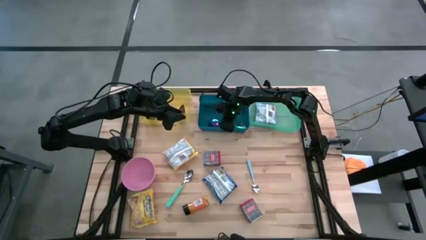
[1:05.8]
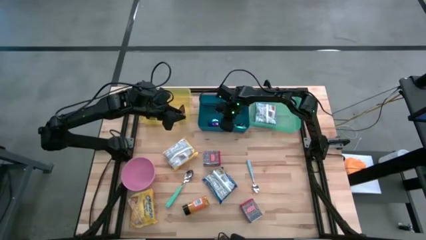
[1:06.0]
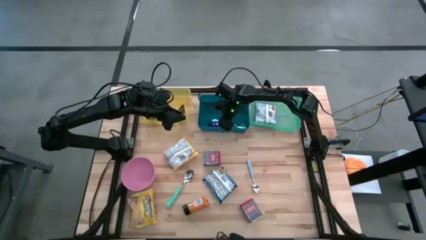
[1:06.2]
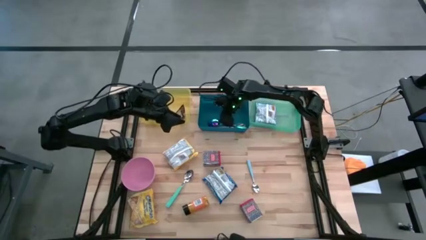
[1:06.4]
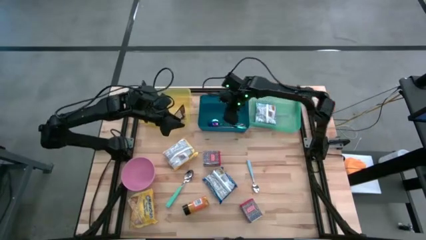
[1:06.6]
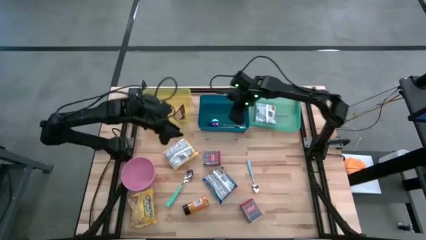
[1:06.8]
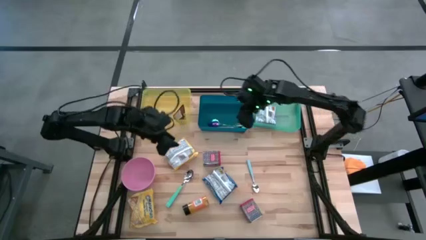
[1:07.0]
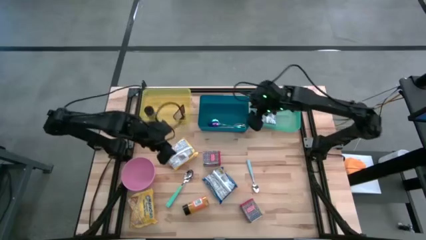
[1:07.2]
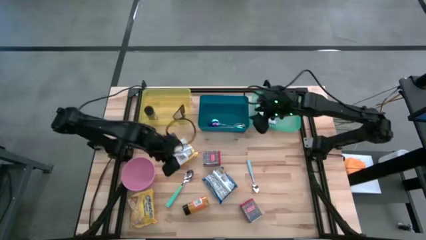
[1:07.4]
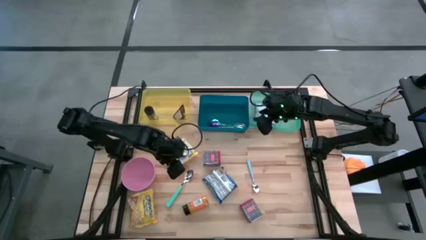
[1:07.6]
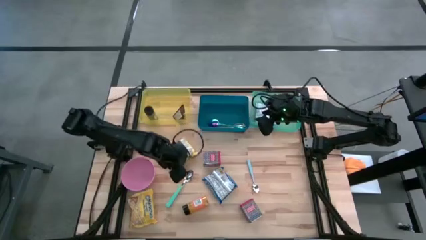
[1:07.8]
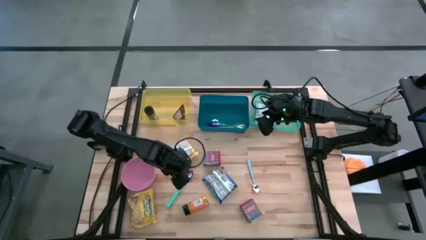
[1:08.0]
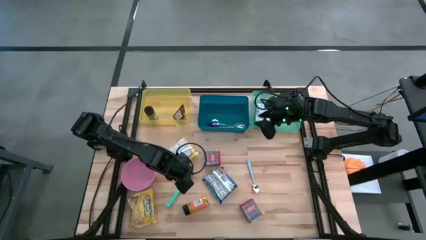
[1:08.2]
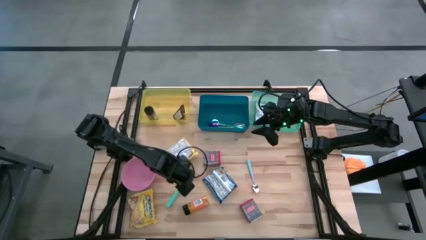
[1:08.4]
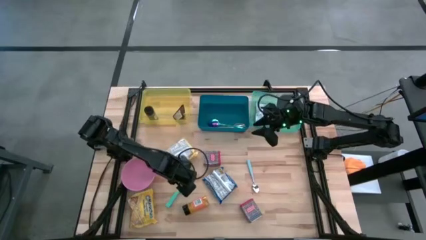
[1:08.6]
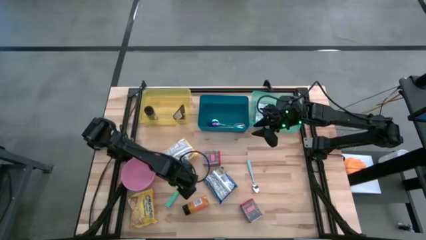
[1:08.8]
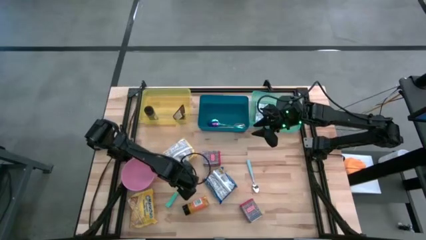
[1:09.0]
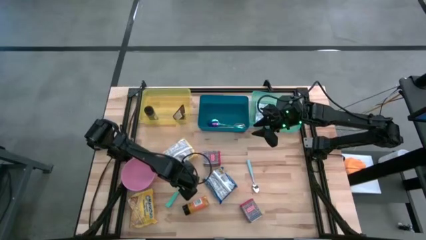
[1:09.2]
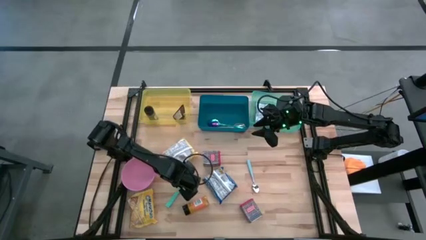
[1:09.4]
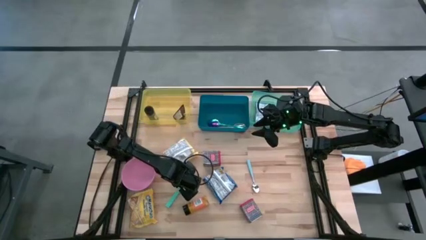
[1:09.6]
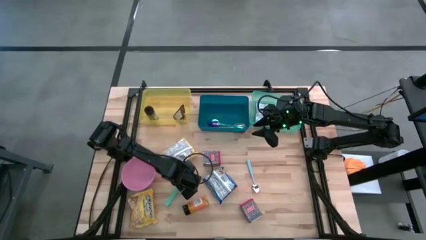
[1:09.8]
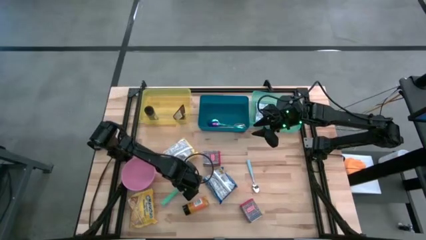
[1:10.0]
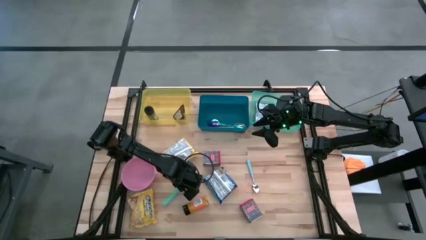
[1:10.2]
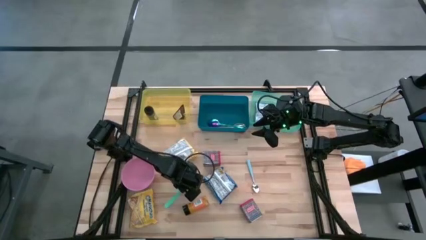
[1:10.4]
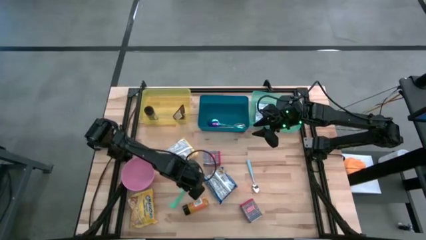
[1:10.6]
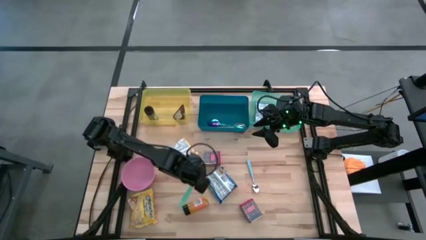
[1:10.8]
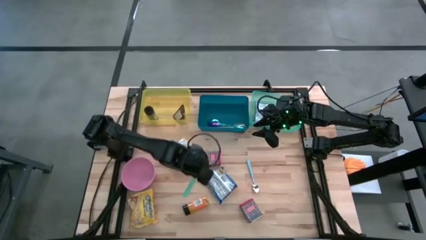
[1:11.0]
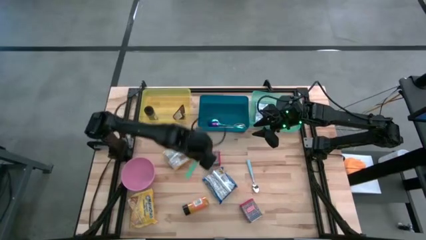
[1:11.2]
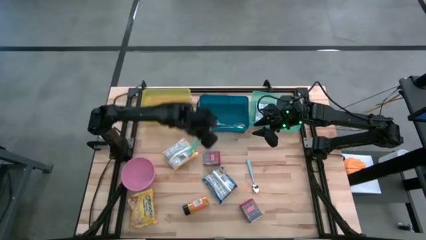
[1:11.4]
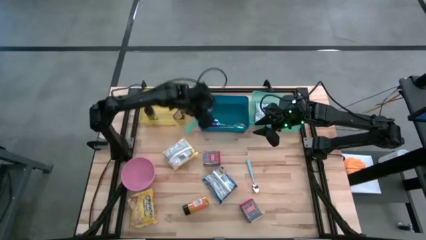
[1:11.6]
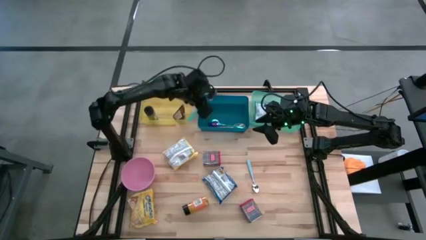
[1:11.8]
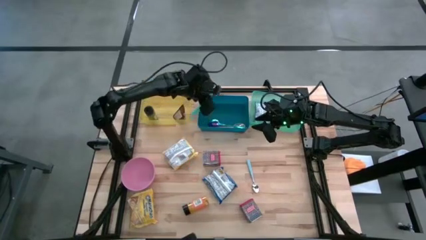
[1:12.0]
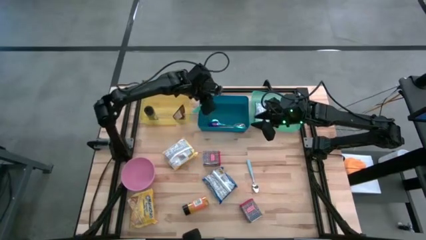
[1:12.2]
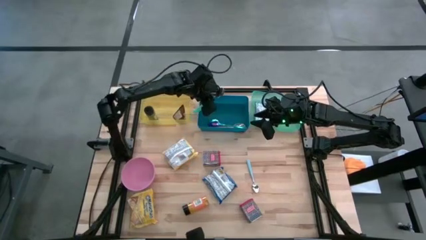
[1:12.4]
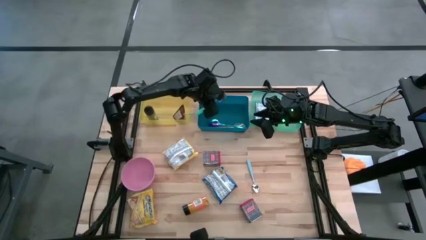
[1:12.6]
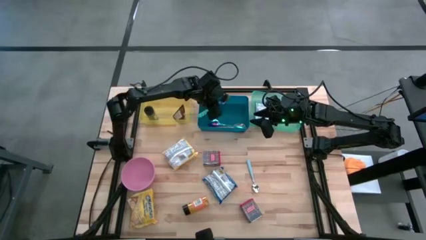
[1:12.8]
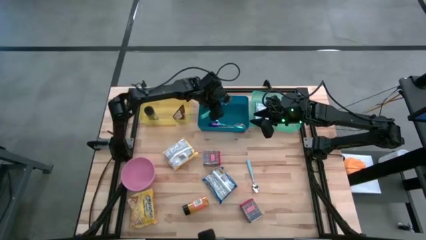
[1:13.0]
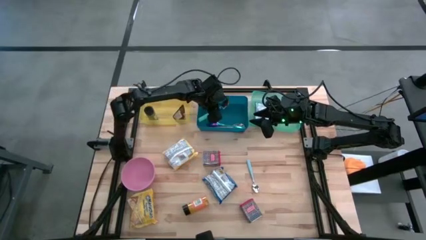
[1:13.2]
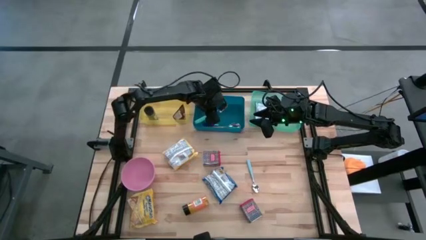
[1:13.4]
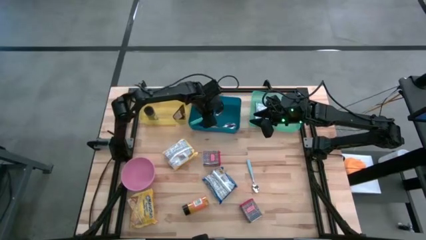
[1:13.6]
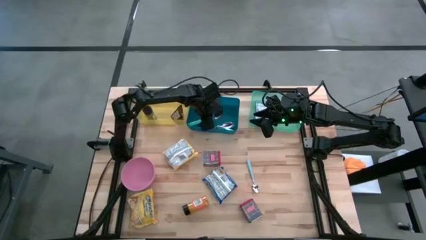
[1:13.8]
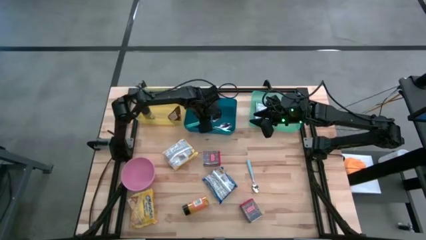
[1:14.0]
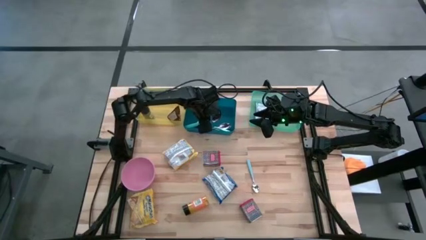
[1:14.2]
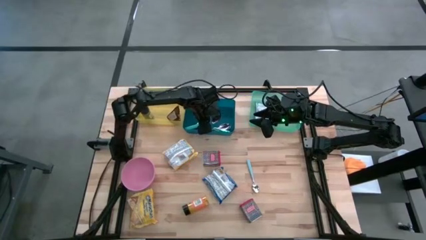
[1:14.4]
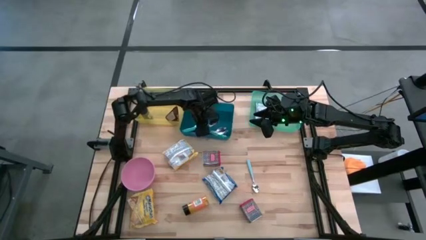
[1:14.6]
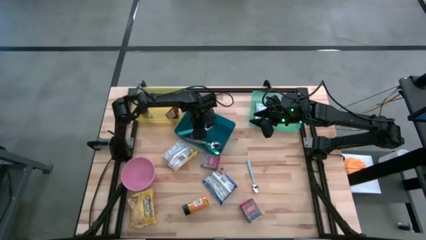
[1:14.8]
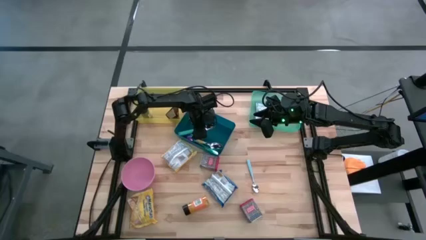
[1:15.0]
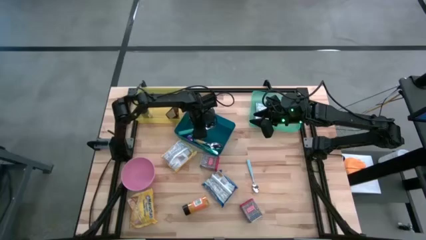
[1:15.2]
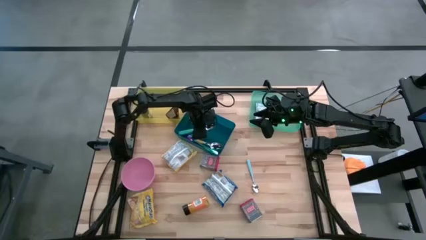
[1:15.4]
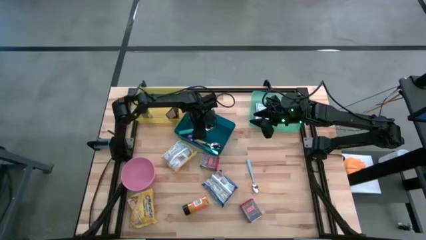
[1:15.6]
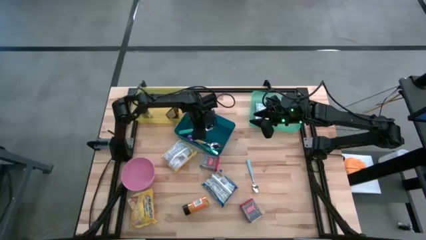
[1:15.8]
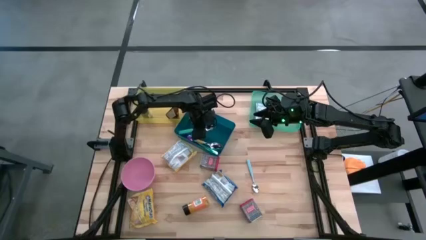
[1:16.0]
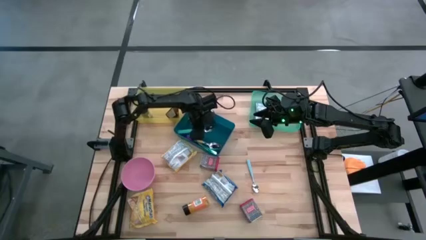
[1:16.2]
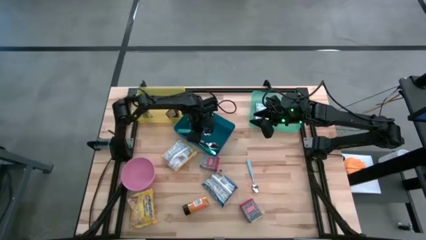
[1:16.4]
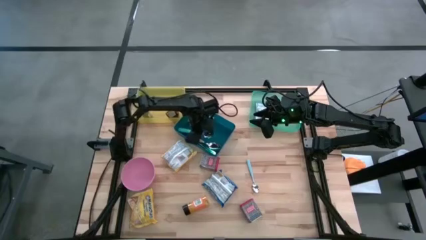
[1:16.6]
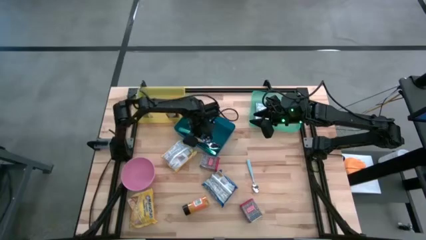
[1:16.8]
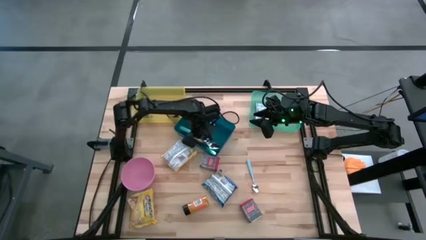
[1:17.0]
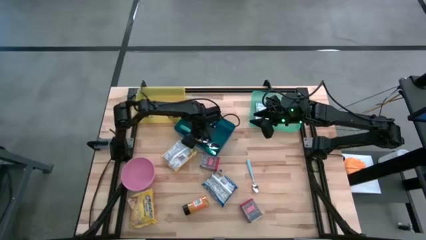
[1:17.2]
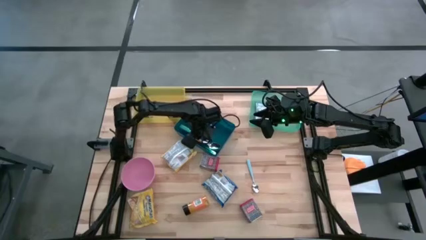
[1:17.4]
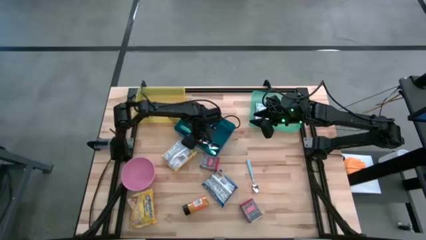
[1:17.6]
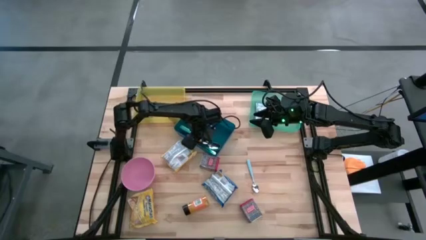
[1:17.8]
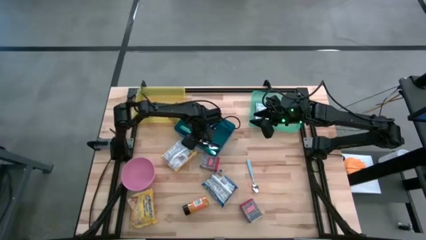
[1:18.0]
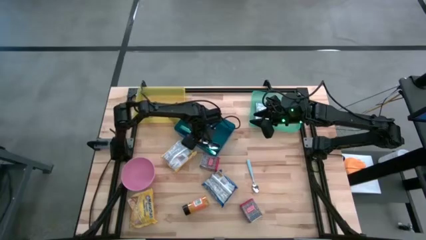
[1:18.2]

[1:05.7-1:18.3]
Put the light green spoon into the blue bin

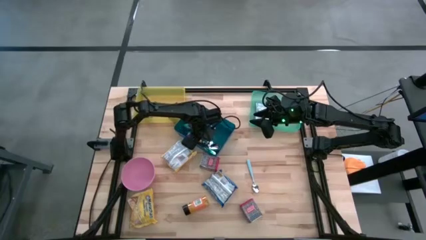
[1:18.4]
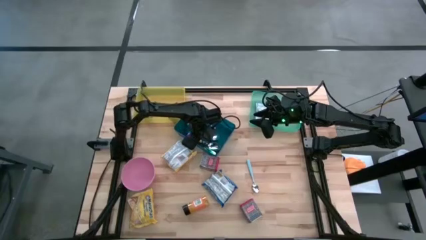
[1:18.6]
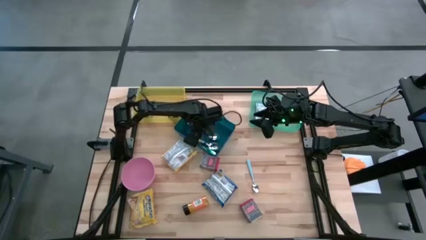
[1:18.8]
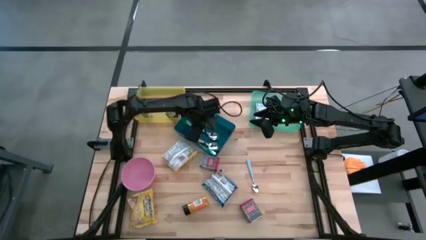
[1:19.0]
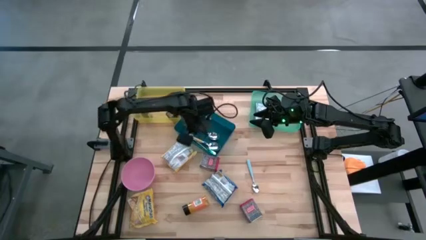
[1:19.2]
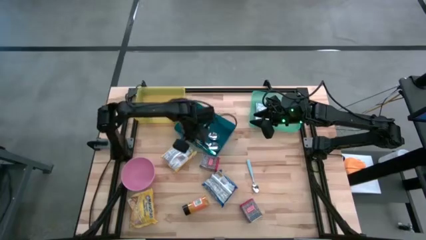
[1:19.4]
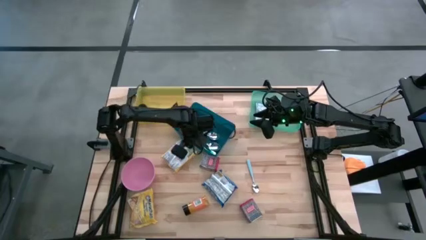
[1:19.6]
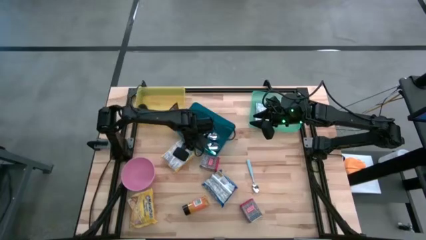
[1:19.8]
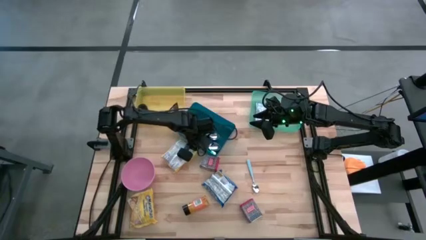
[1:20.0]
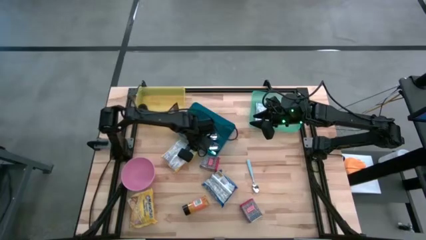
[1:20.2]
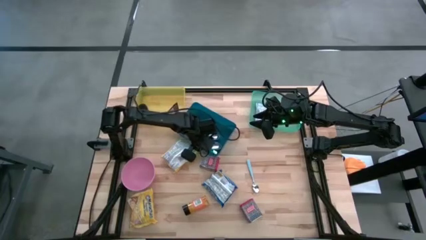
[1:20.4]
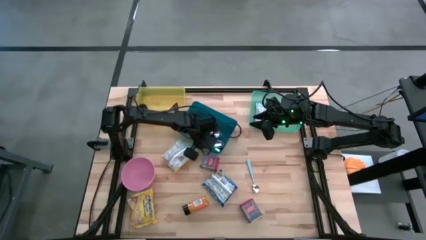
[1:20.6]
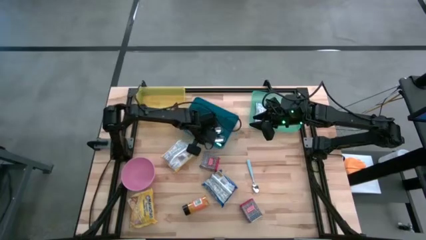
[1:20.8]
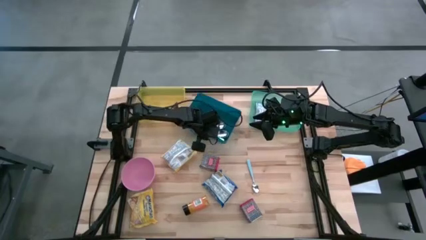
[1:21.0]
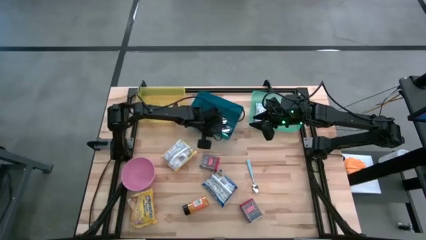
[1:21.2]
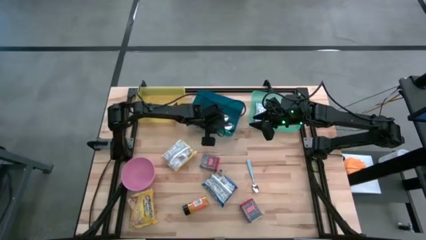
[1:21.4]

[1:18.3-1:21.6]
Adjust the blue bin
